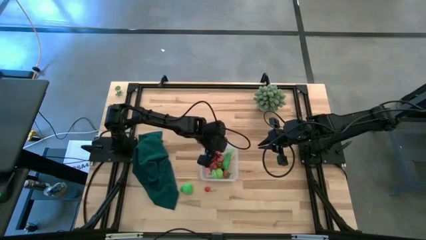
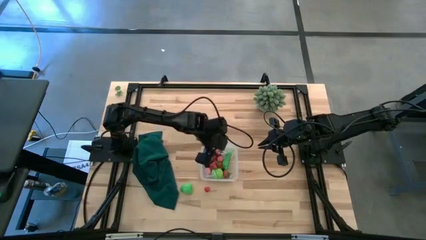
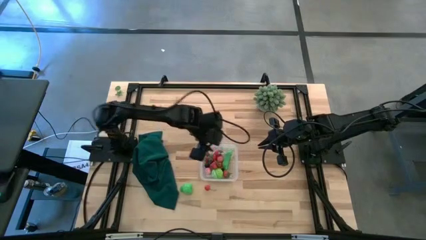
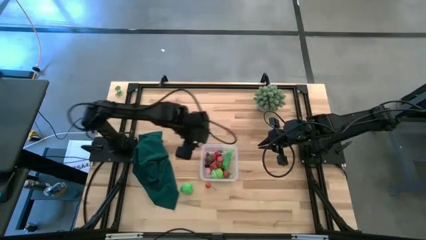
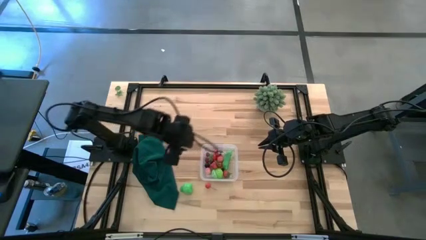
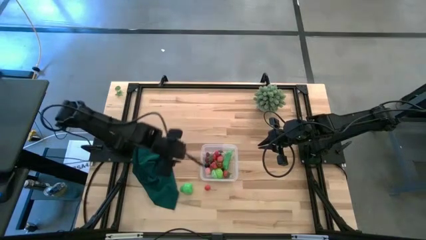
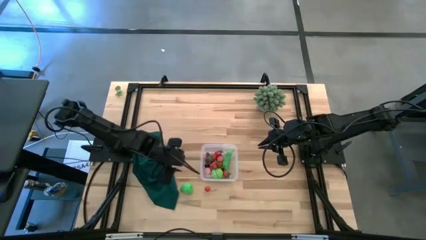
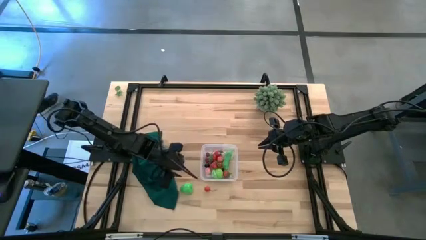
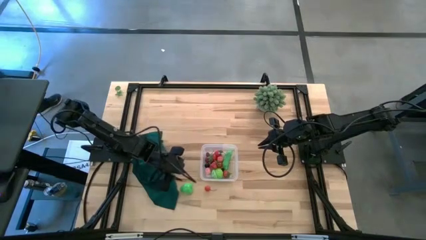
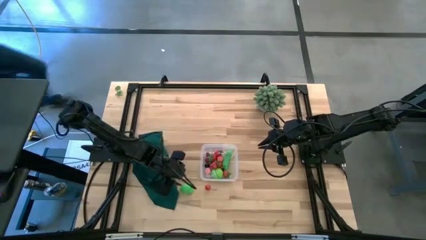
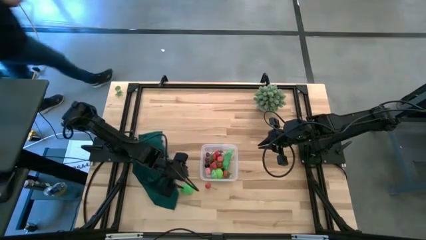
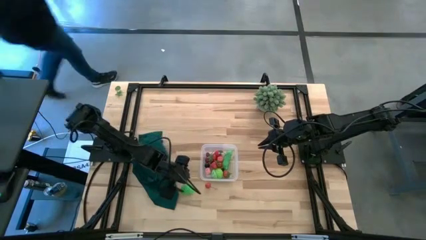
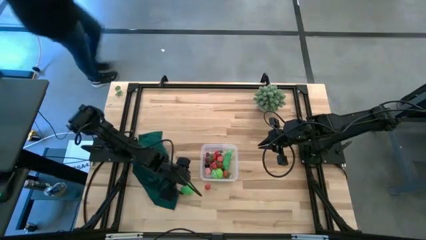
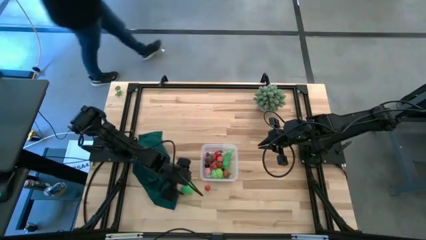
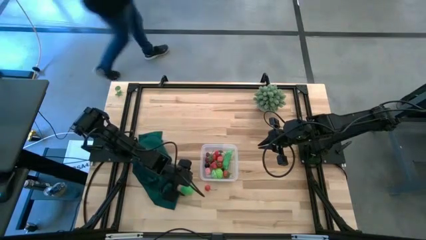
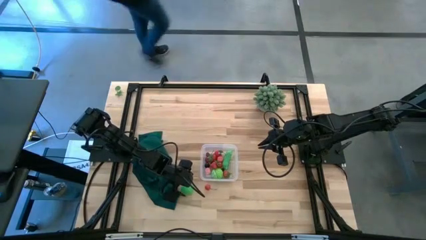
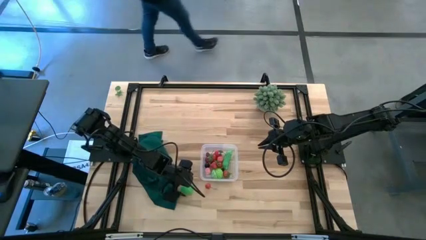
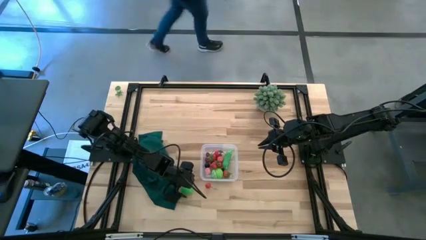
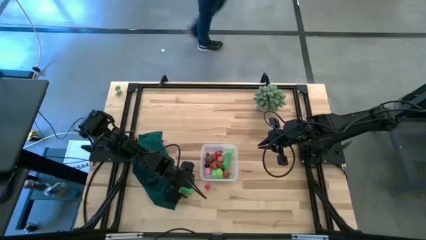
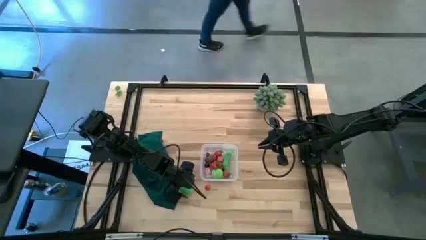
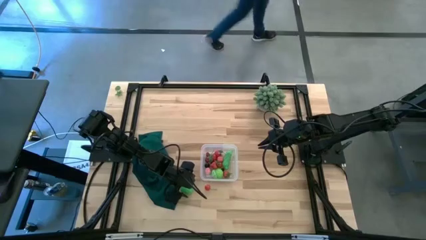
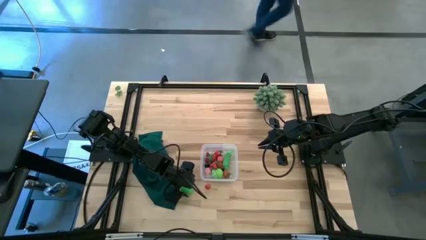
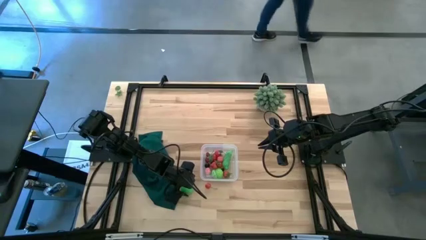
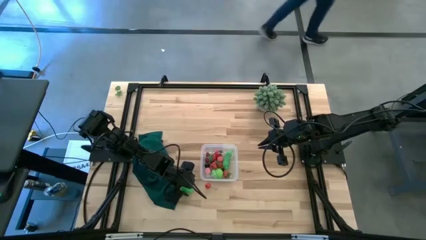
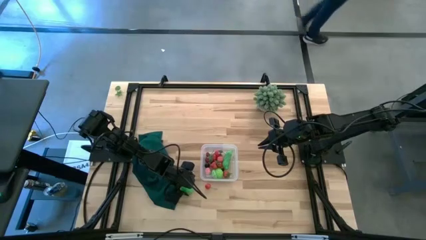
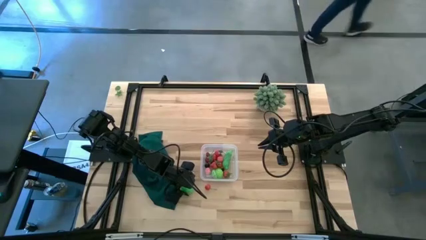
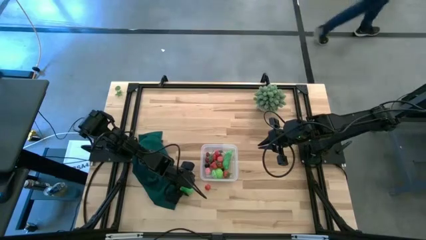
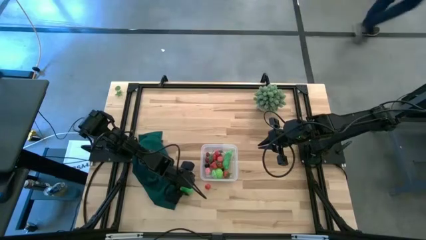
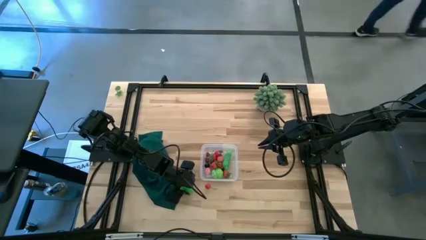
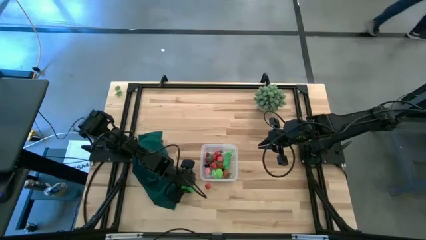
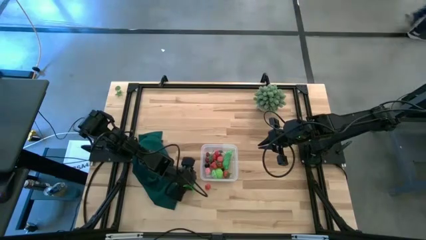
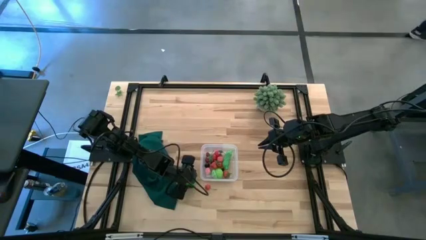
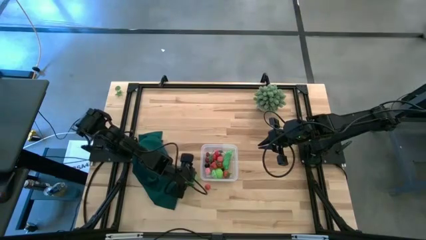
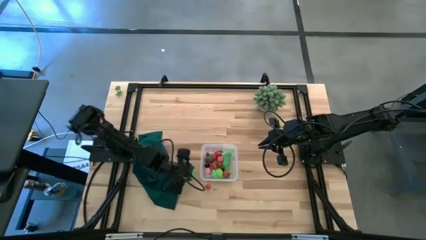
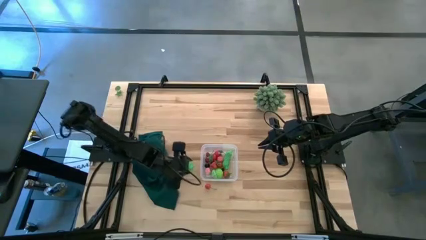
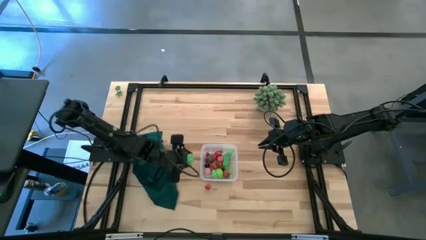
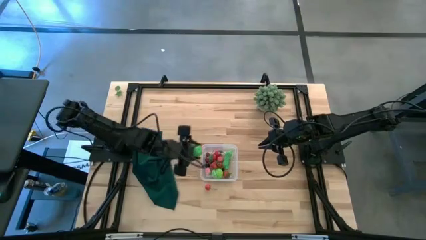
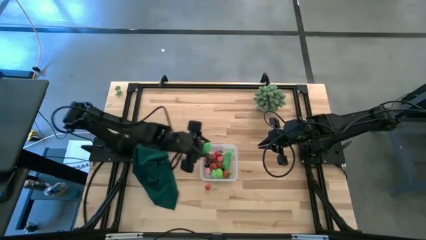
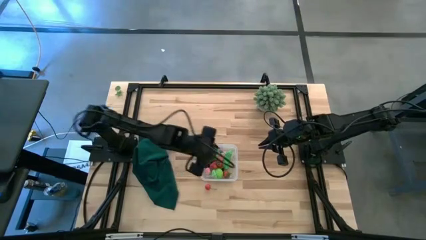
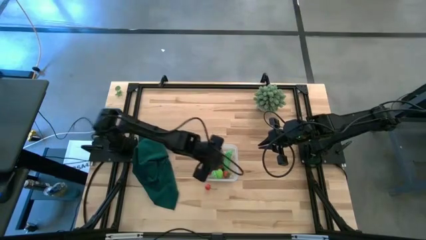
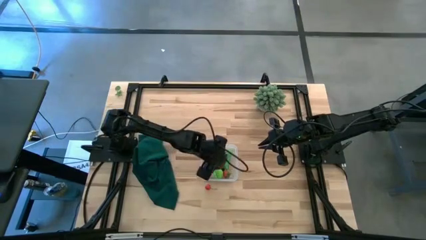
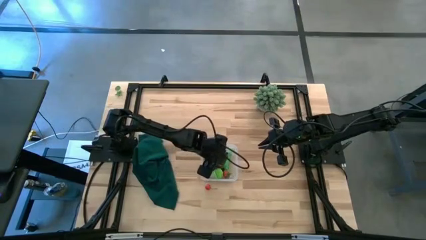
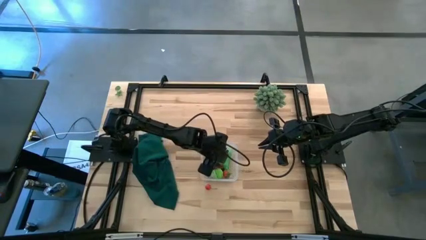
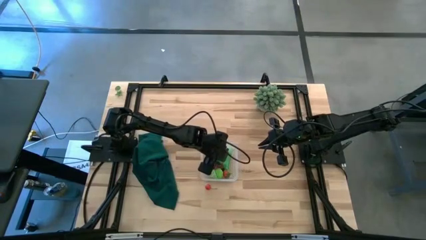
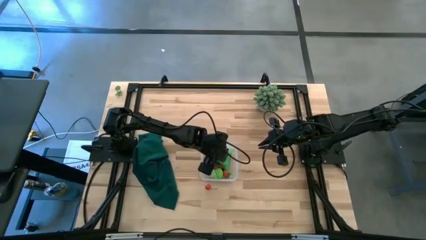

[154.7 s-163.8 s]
Task: Pick and placing Produce into tupperware
Put the green pear into the transparent bin

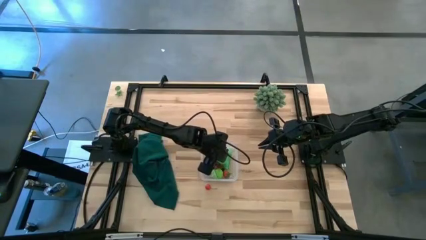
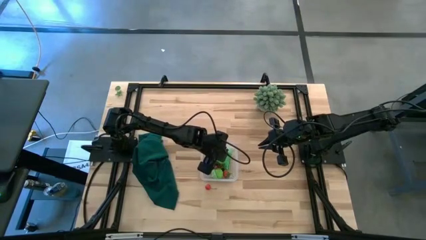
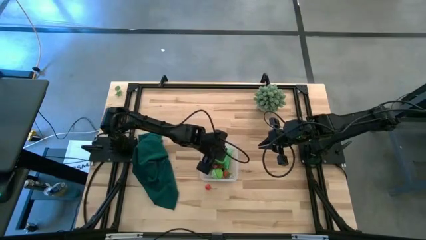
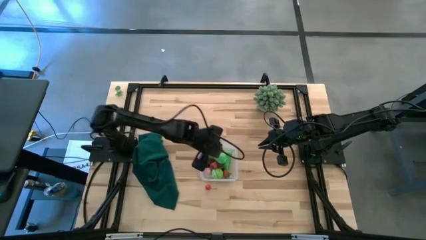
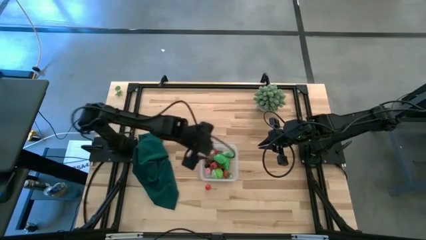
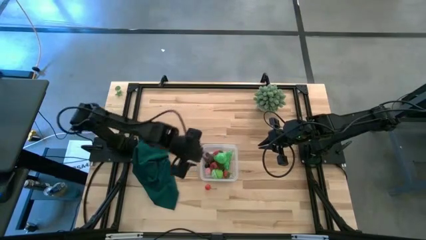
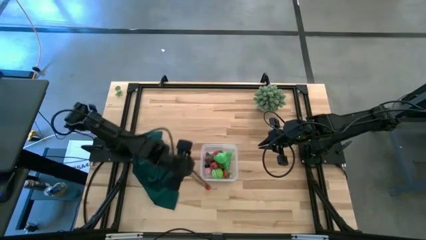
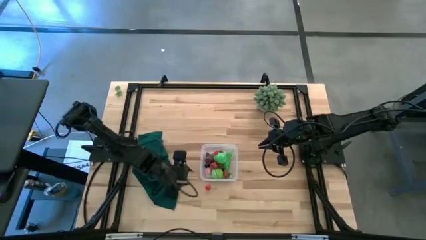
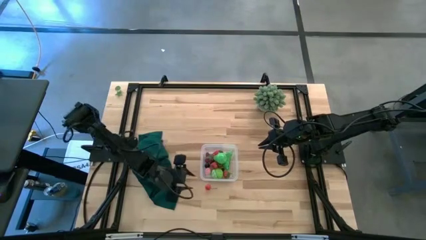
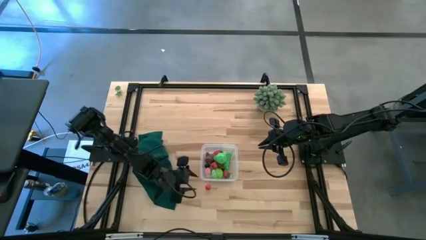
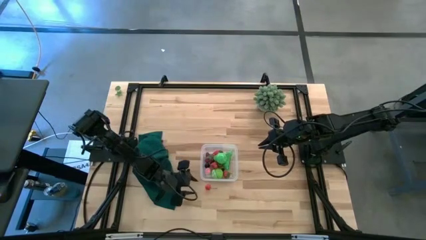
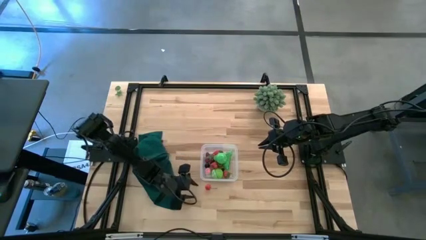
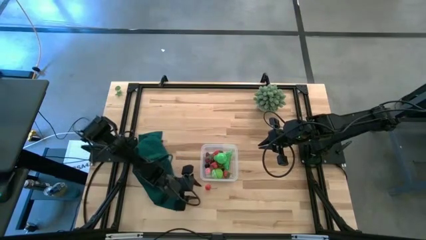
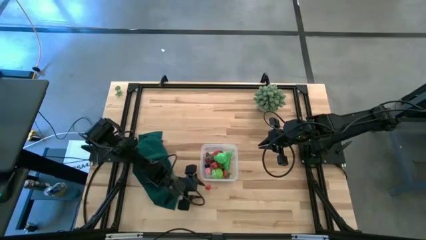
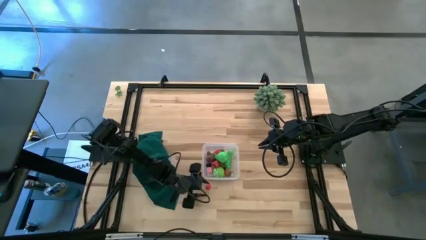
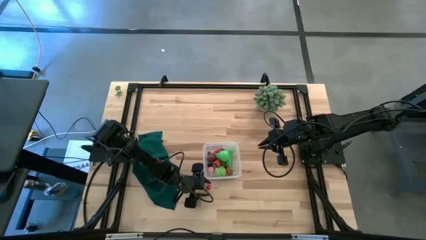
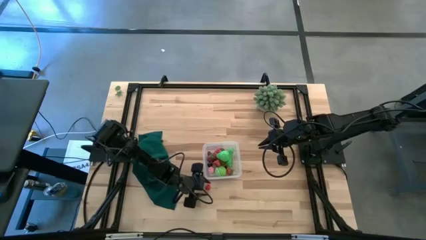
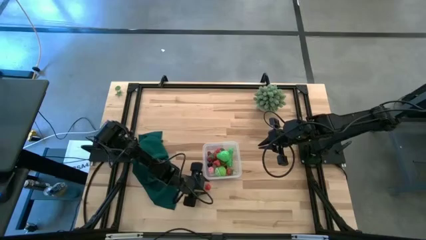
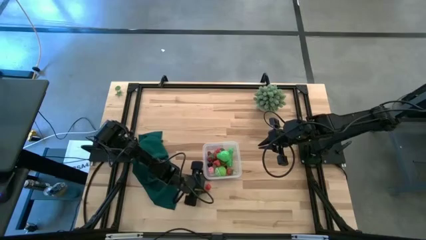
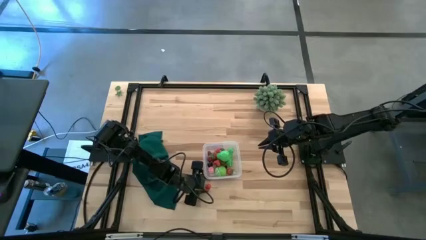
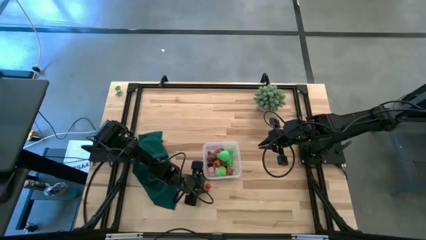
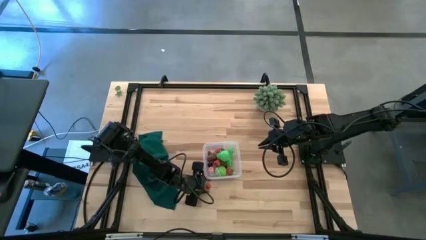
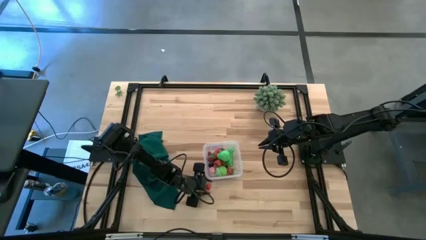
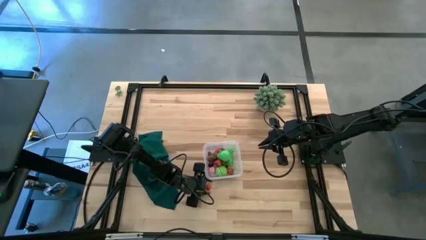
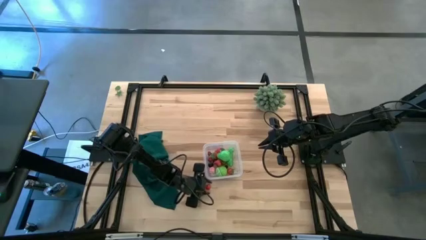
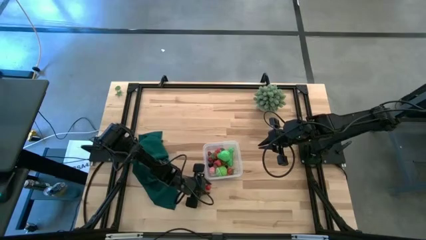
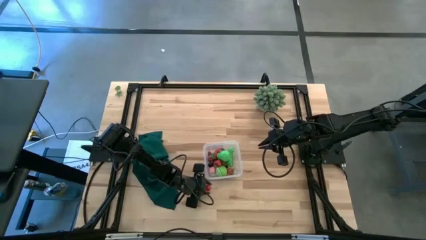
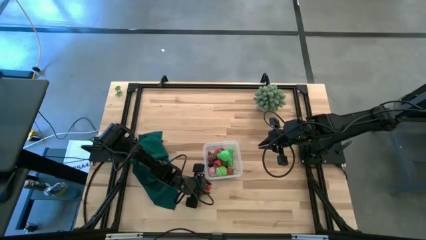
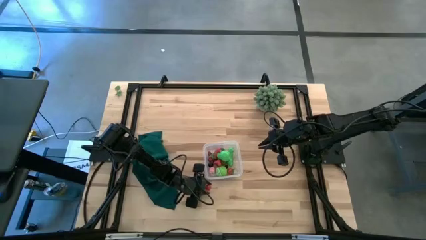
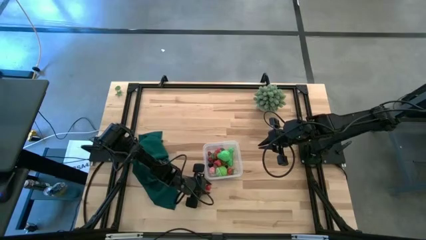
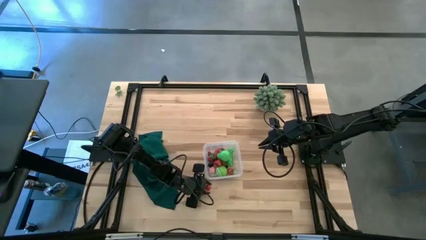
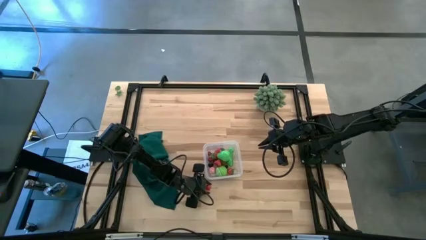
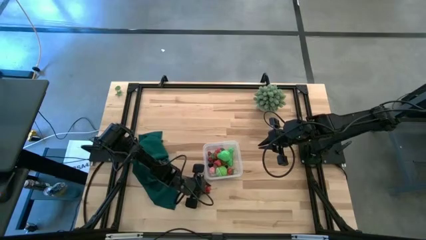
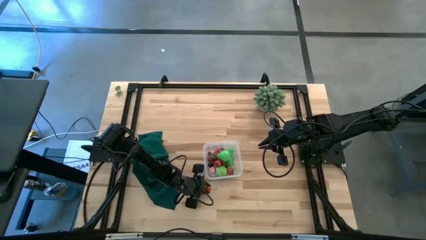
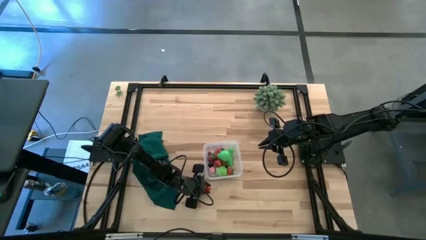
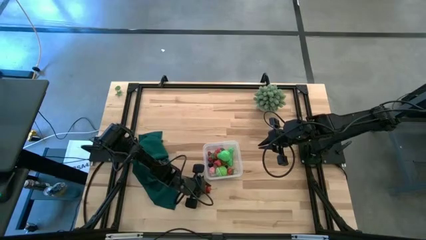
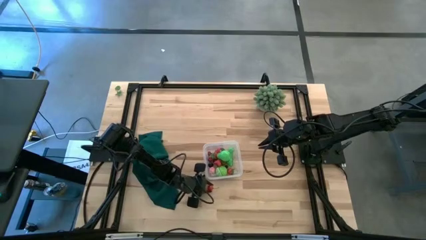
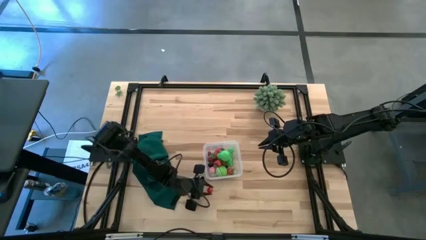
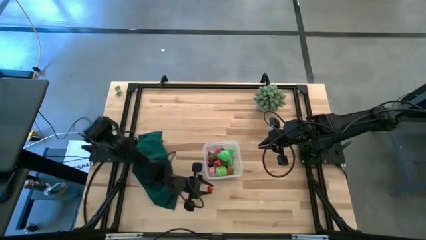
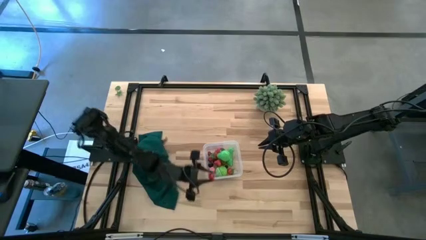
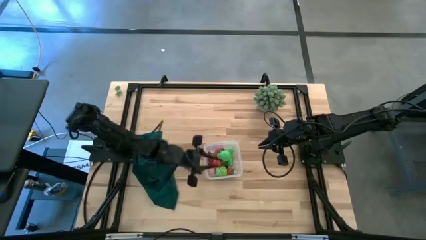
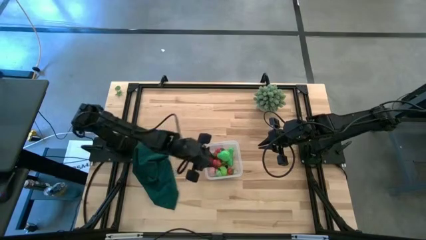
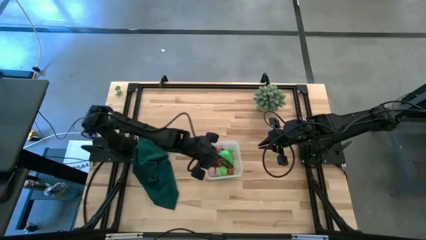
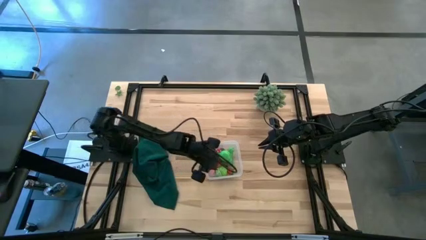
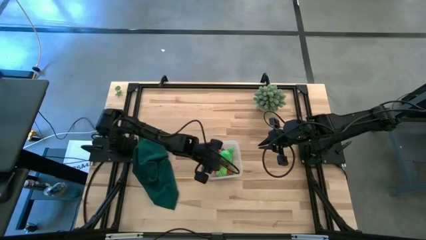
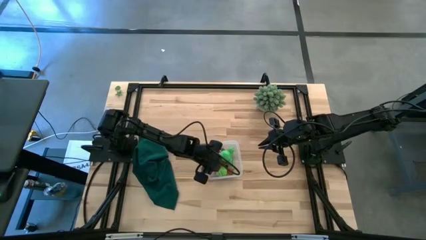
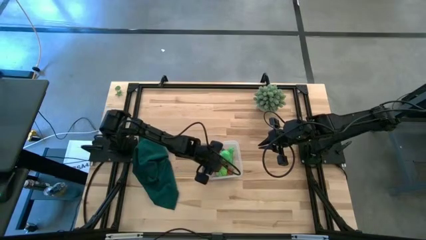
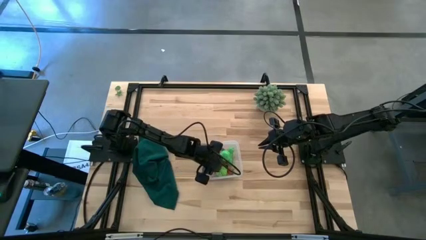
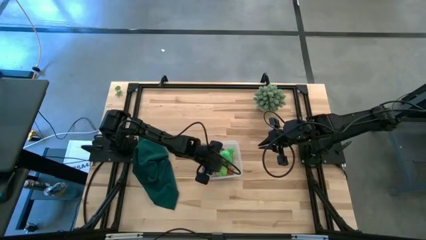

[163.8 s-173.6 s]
Put the red cherry into the transparent bin
